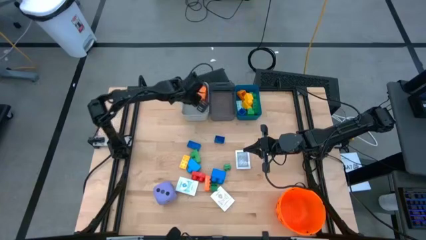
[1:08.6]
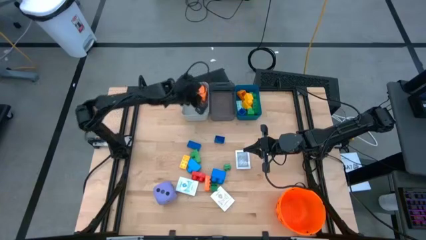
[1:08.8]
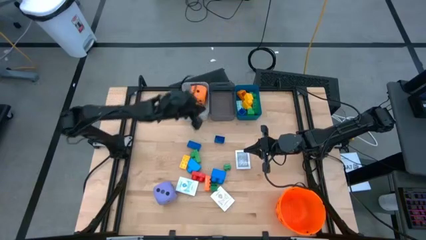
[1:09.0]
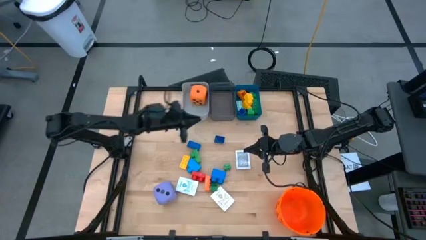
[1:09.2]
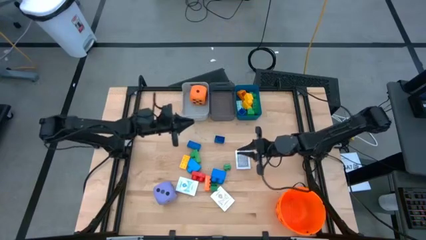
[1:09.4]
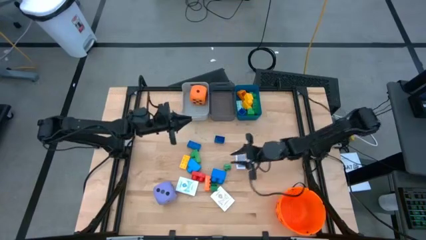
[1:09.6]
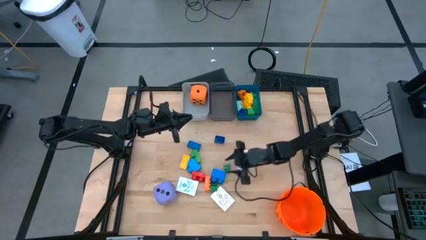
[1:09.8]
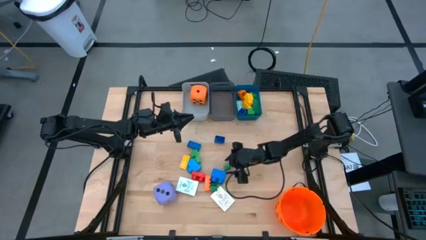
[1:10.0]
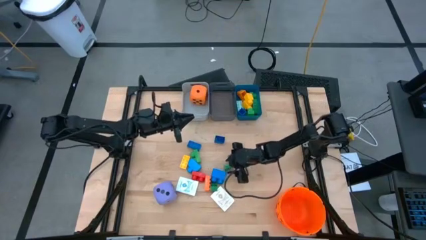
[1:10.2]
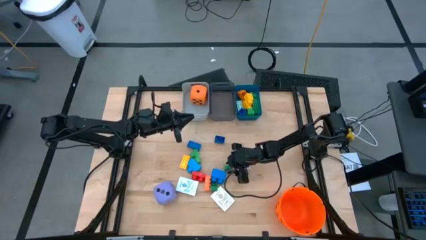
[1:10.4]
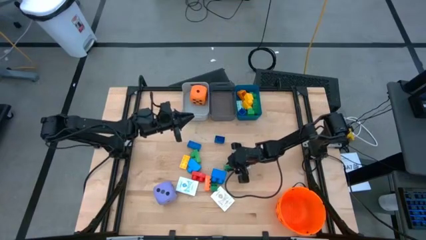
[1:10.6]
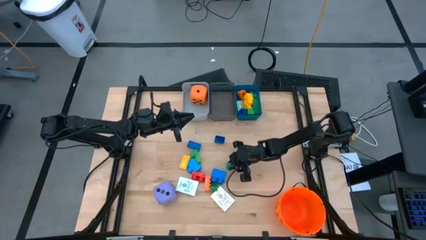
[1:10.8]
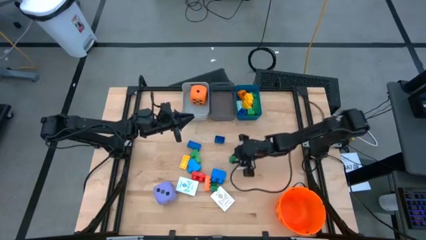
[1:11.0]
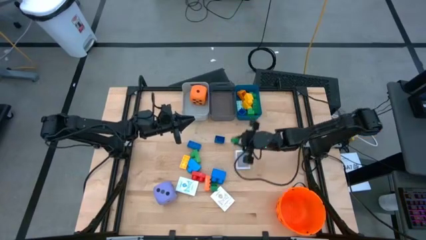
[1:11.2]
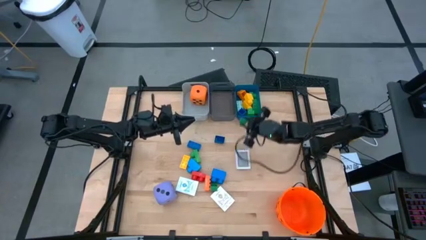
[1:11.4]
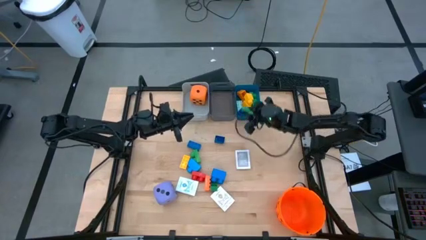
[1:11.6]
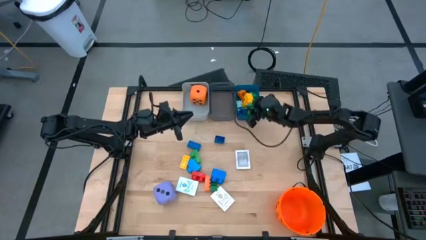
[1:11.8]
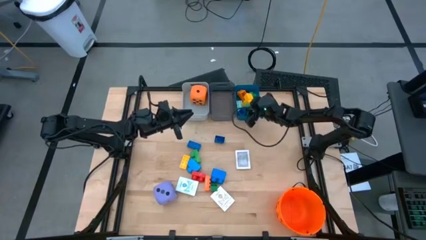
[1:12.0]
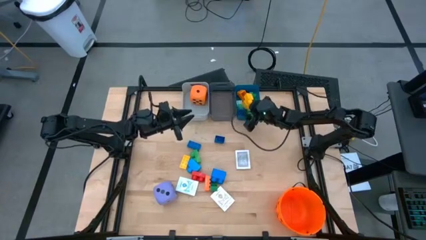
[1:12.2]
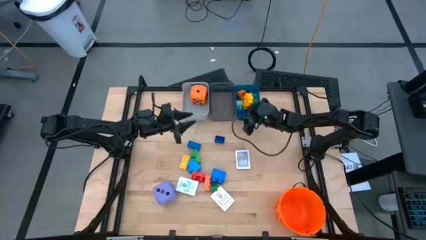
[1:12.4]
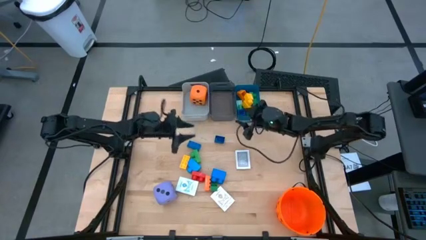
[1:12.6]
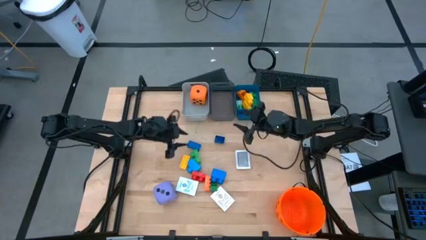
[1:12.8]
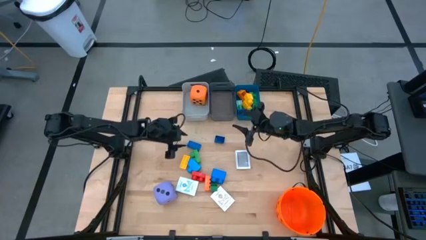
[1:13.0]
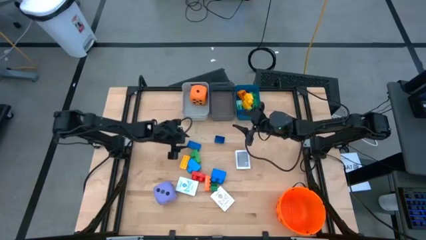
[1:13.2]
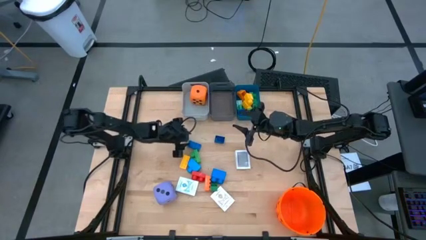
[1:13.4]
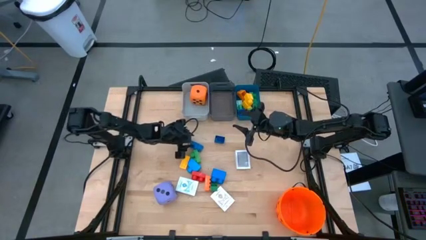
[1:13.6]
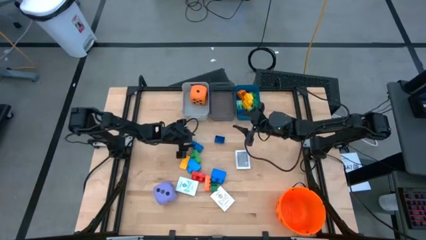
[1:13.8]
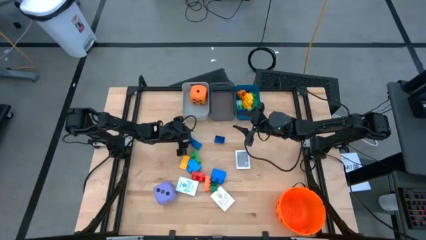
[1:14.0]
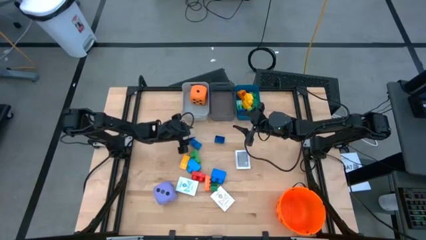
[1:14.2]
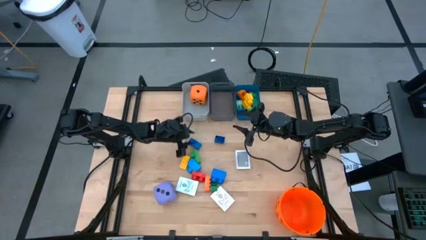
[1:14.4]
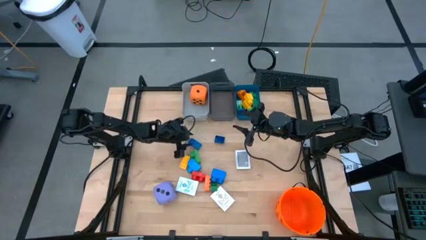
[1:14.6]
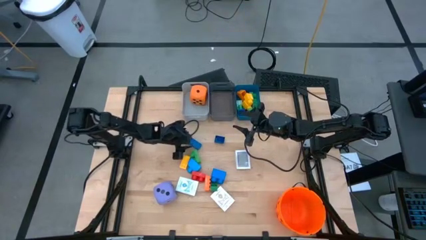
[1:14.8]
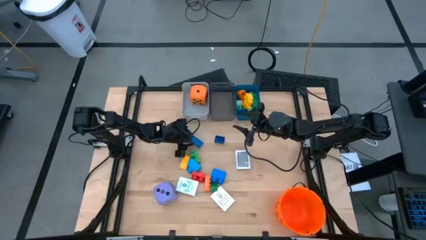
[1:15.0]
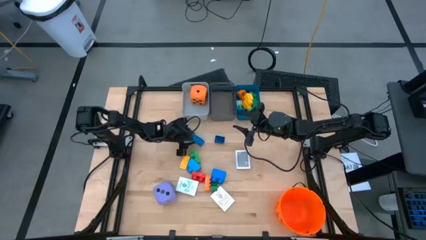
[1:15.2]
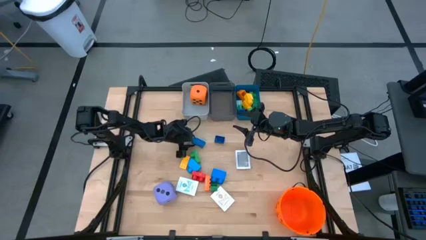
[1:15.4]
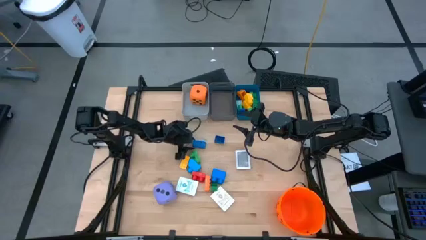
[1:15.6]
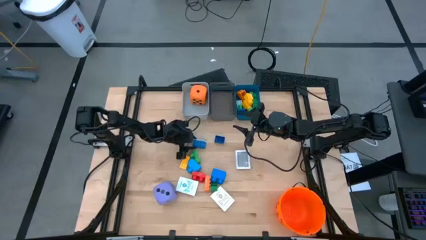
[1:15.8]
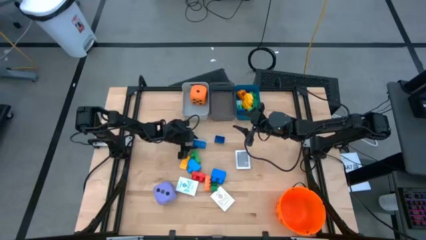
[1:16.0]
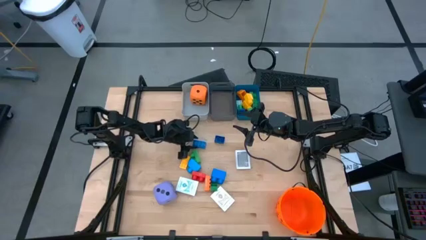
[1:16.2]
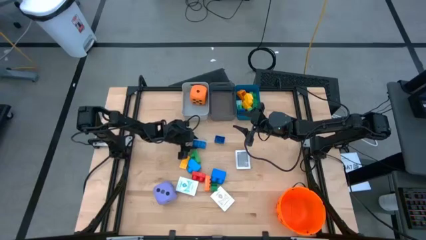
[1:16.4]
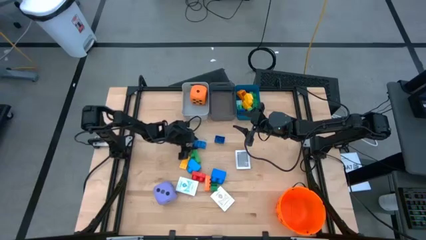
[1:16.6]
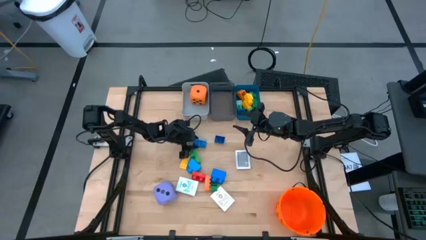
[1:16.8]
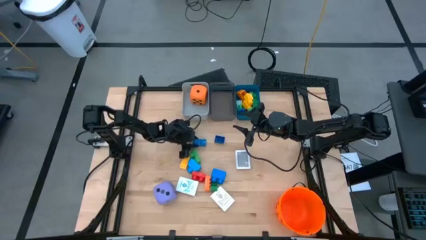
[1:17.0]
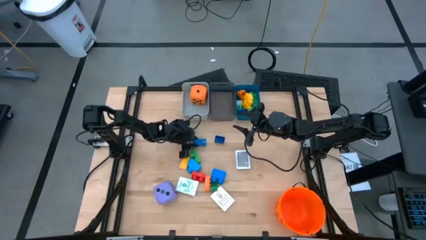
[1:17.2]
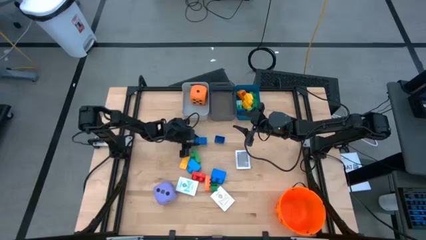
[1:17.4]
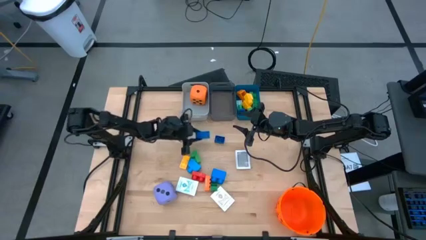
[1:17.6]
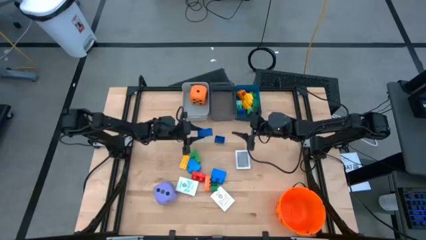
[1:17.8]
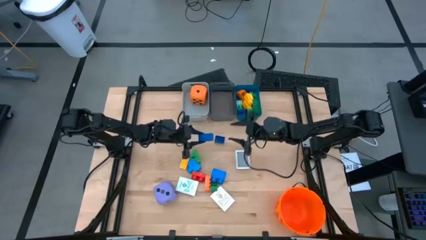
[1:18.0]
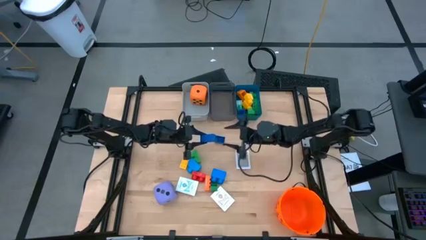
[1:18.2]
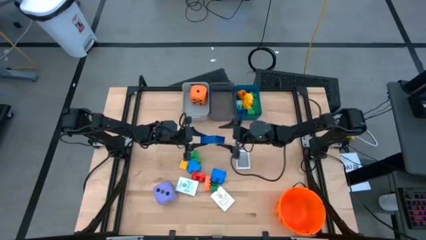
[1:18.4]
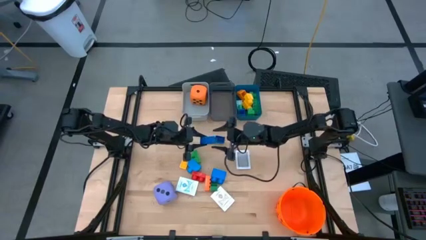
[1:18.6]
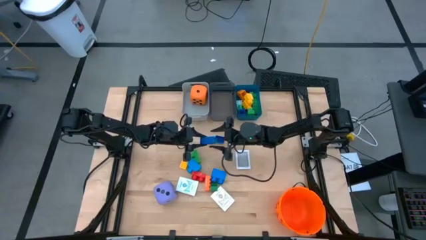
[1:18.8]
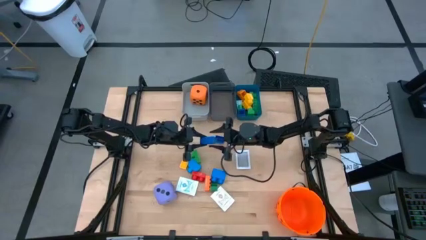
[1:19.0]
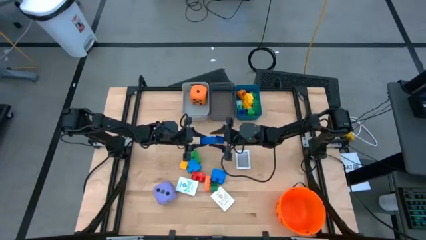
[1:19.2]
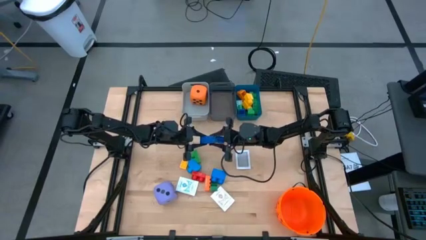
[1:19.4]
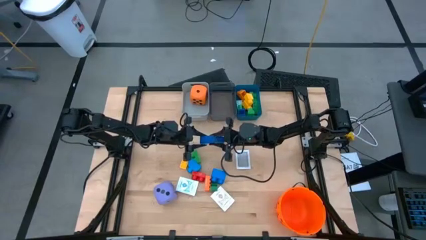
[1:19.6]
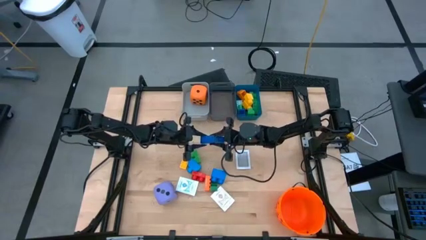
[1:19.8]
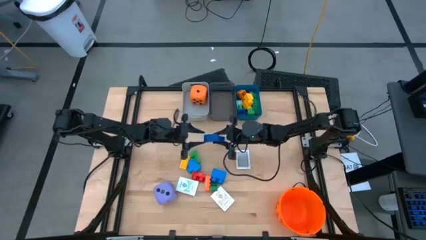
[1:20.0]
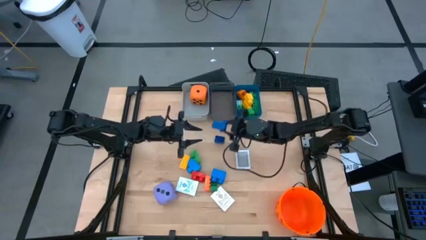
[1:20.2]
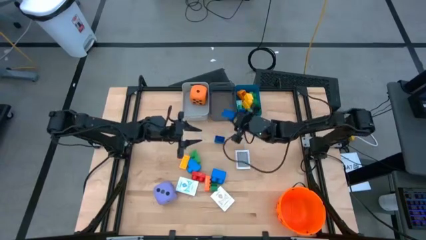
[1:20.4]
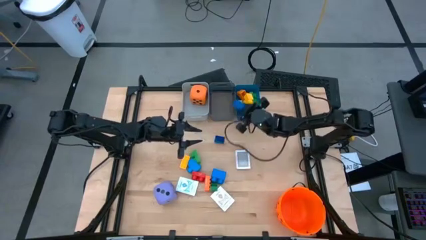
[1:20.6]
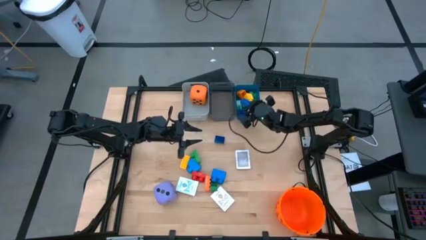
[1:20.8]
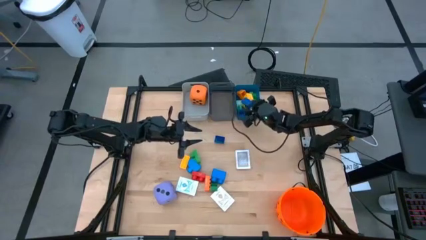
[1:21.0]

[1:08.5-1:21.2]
Task: Pick & Place Toys
Put the blue game piece into the blue bin

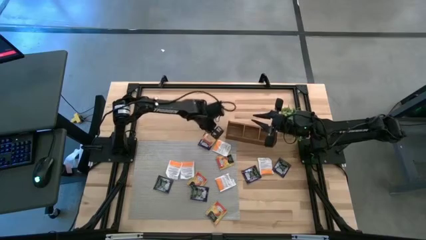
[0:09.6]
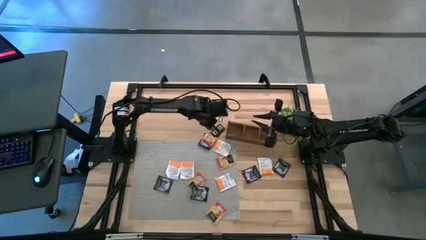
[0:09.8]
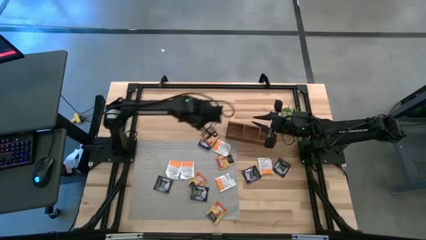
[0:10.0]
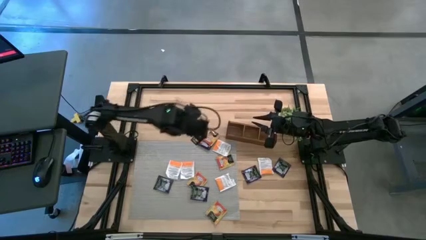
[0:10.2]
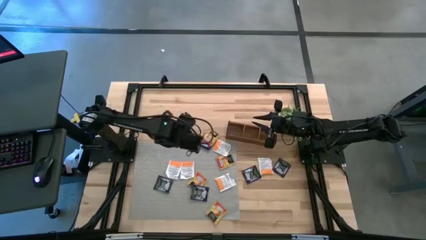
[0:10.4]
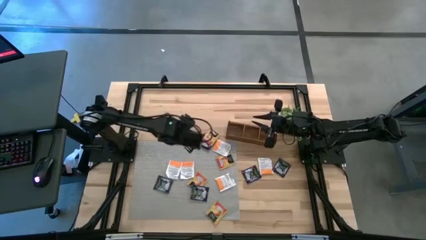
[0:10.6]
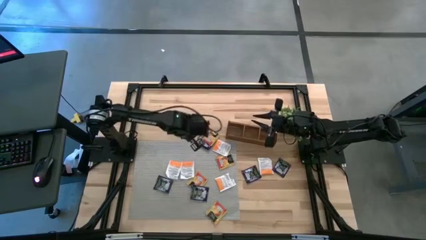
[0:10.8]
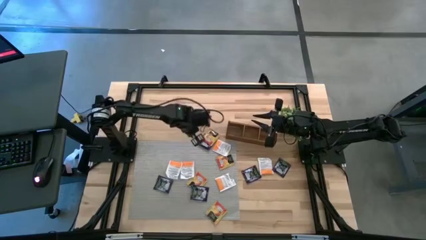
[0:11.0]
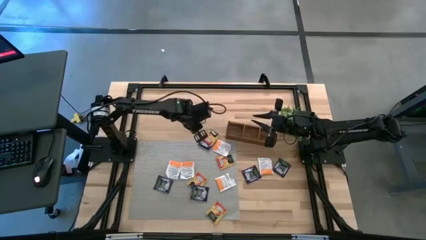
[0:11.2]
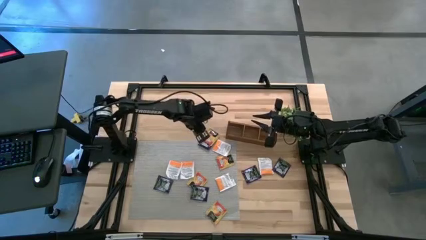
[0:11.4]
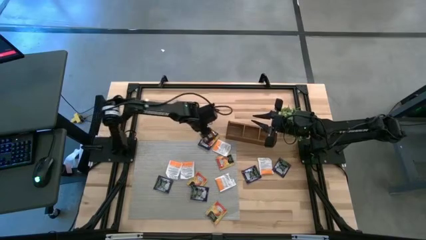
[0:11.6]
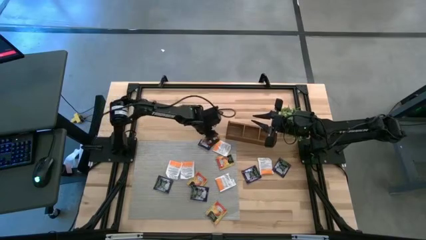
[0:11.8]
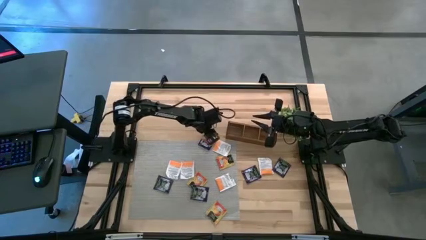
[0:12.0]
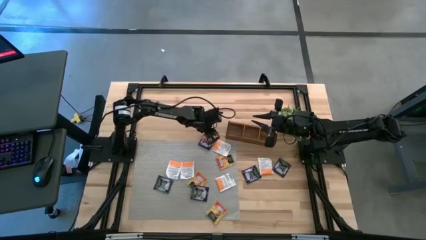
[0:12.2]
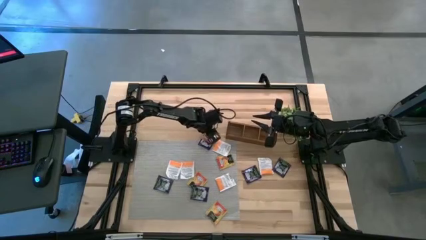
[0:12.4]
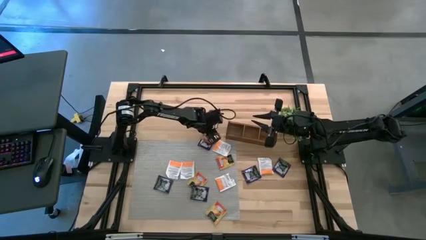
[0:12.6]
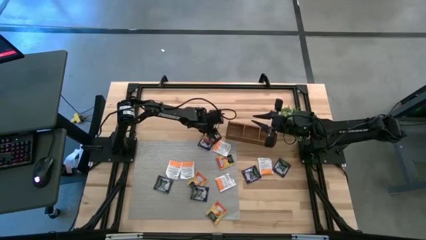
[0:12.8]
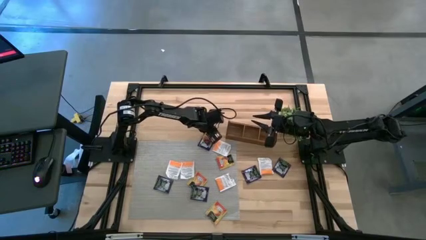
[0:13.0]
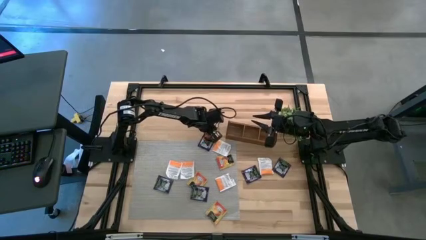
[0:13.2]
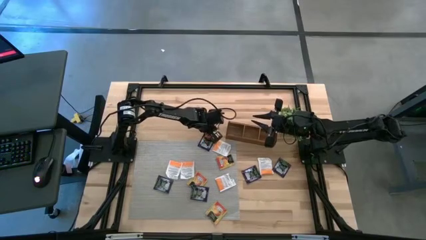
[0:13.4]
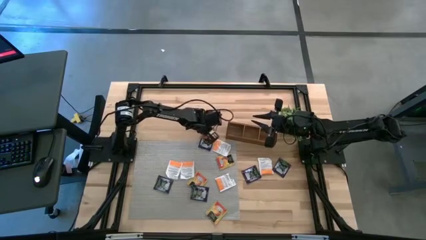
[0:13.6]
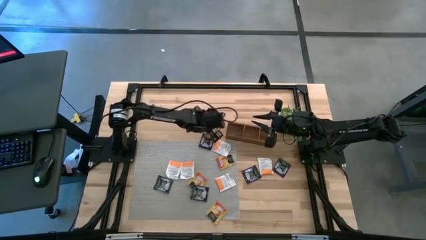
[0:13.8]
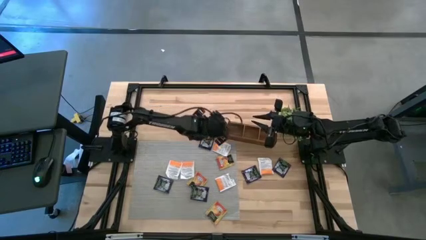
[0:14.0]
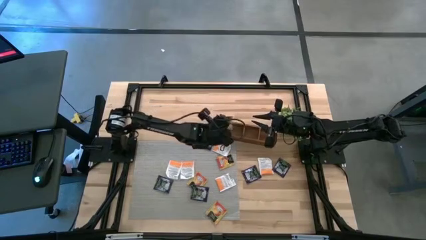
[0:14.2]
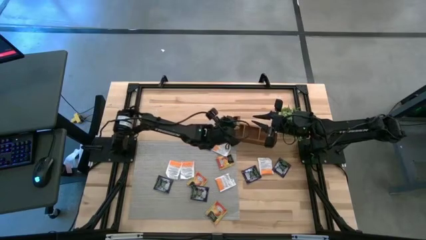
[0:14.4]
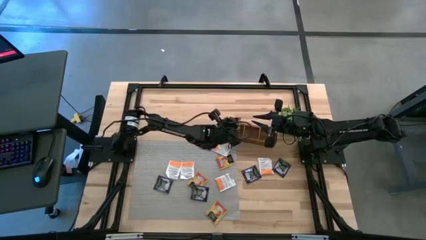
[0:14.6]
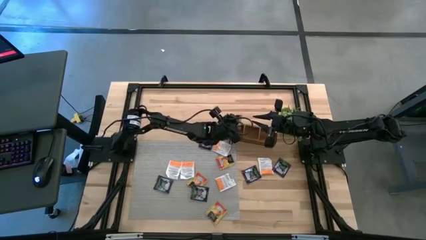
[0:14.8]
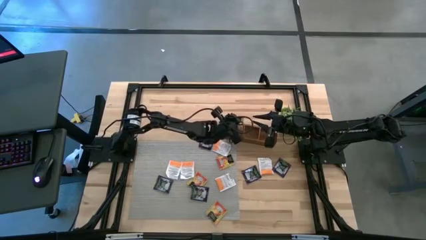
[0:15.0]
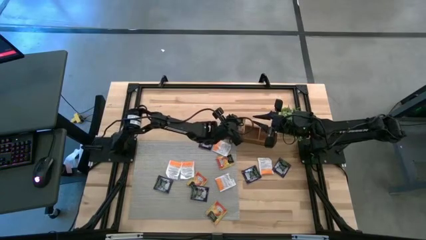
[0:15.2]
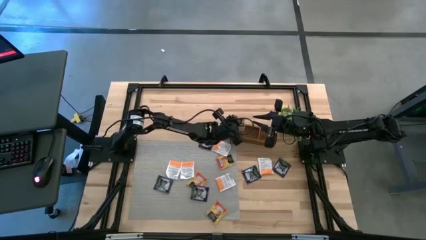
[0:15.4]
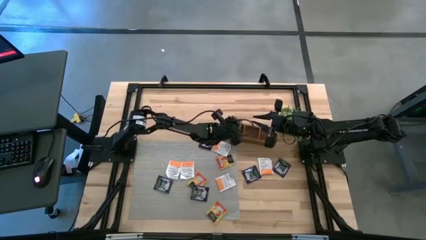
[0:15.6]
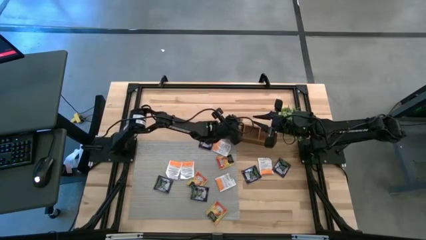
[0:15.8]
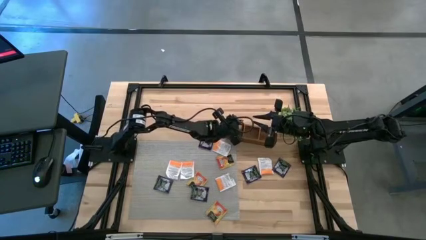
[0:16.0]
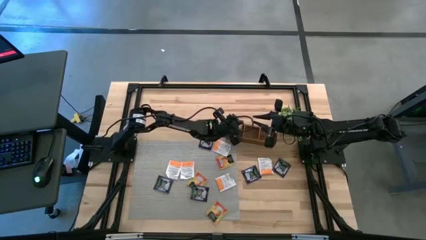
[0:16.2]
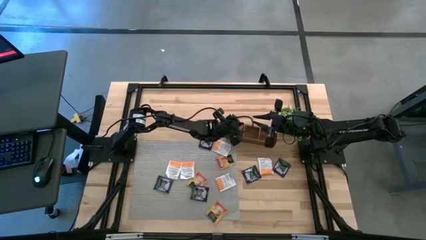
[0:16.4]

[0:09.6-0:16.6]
Task: Pick & Place Tea
Put the yellow tea bag in the left section of the wooden organizer
